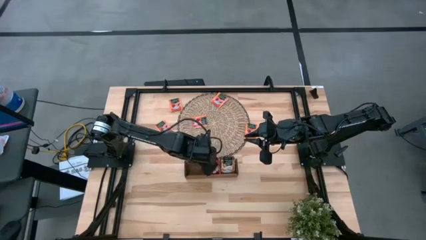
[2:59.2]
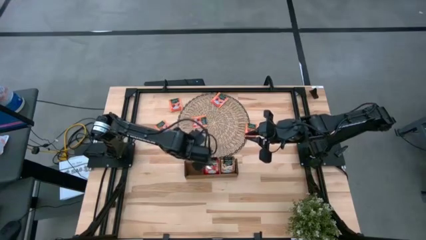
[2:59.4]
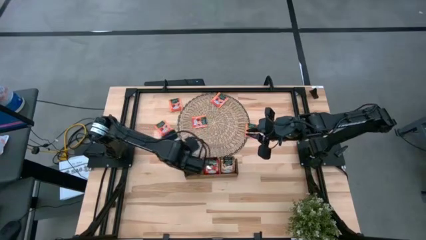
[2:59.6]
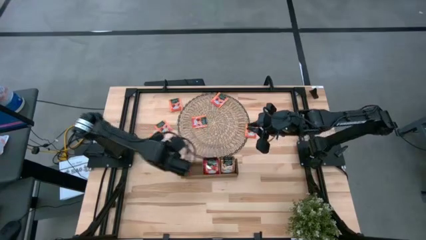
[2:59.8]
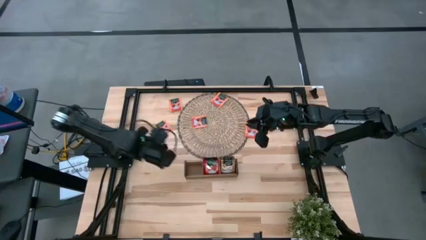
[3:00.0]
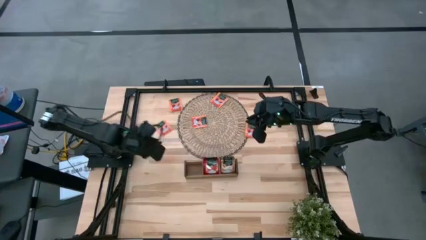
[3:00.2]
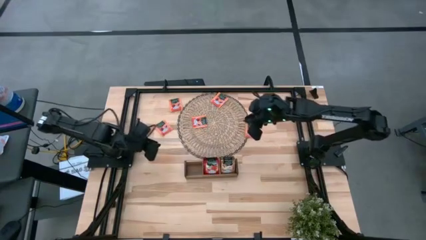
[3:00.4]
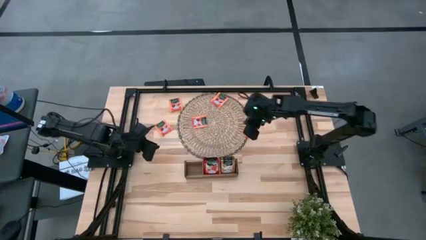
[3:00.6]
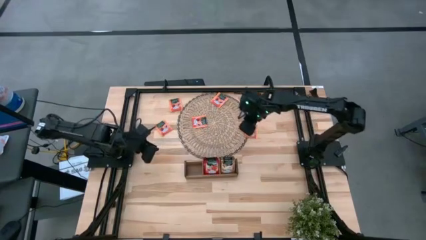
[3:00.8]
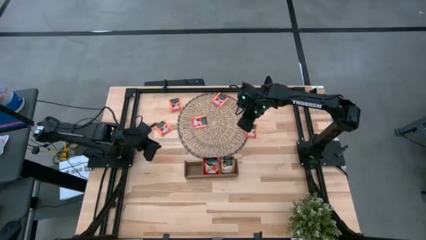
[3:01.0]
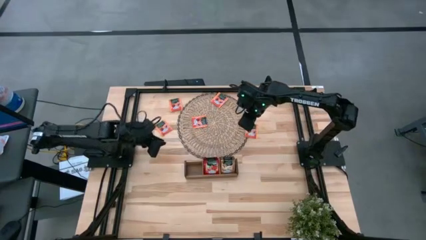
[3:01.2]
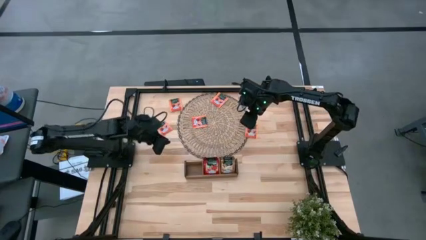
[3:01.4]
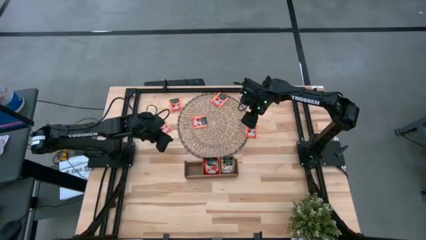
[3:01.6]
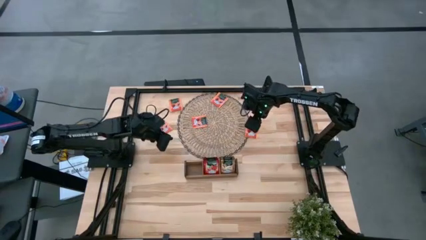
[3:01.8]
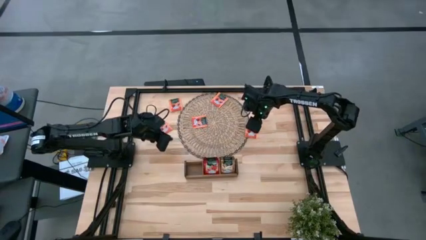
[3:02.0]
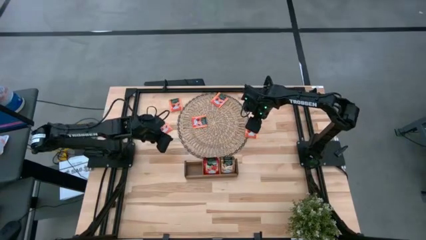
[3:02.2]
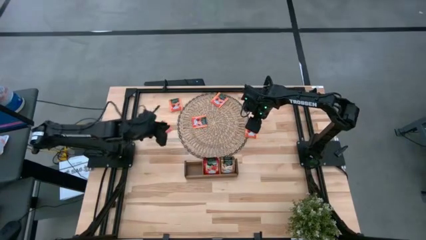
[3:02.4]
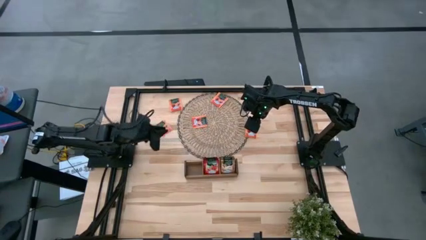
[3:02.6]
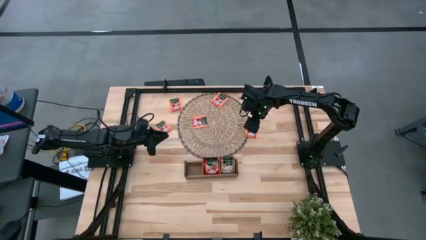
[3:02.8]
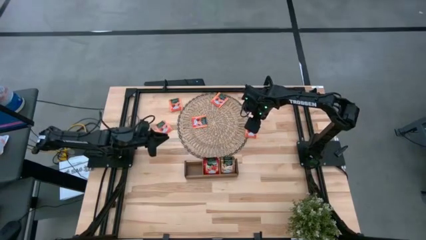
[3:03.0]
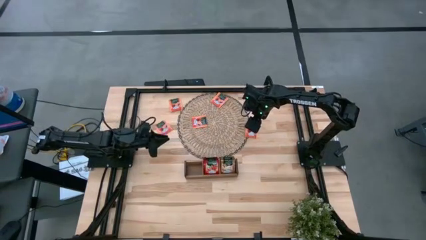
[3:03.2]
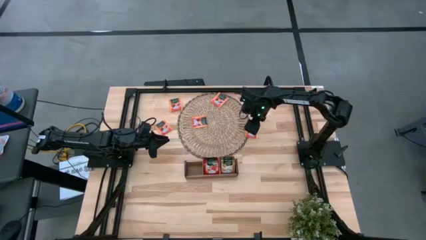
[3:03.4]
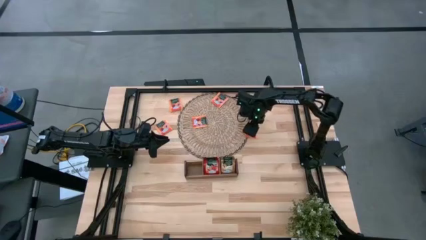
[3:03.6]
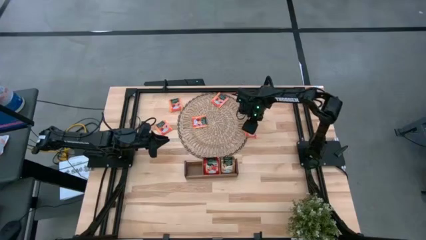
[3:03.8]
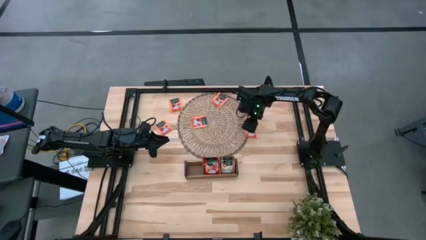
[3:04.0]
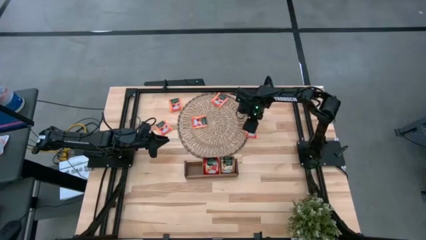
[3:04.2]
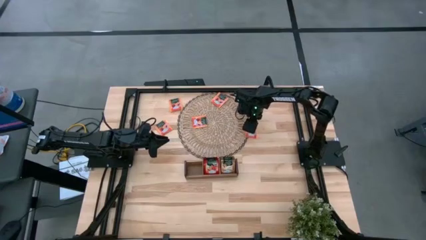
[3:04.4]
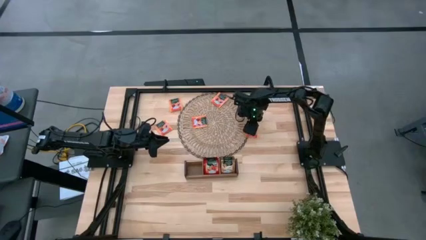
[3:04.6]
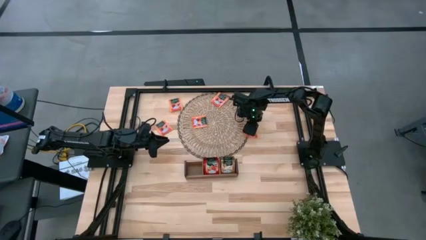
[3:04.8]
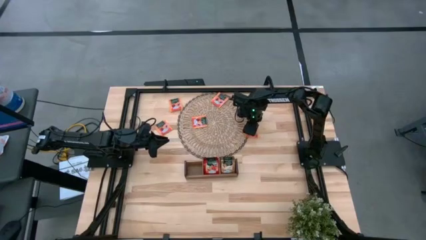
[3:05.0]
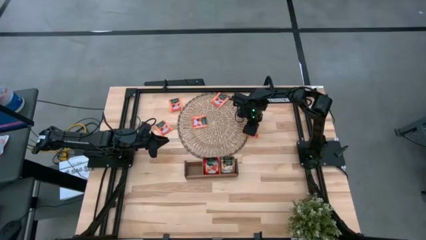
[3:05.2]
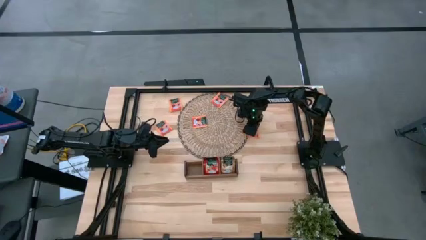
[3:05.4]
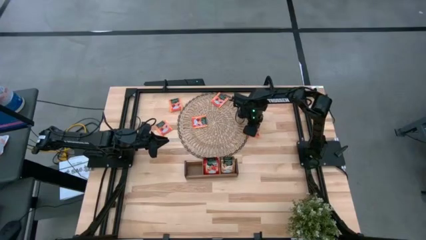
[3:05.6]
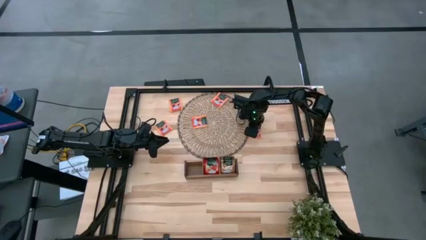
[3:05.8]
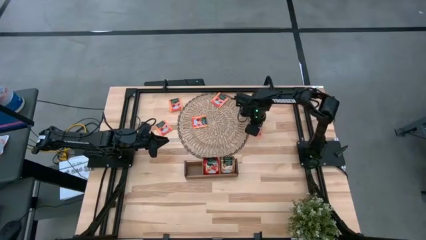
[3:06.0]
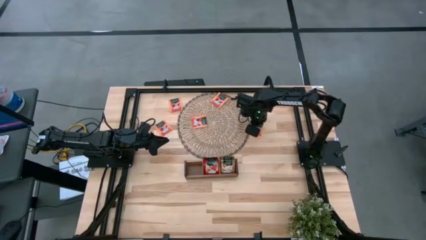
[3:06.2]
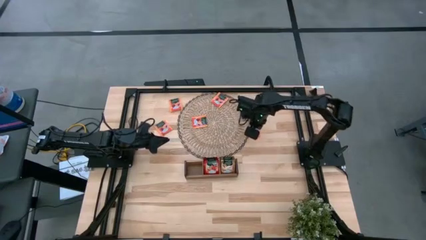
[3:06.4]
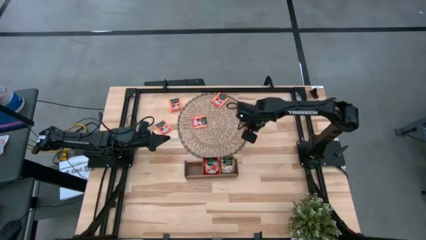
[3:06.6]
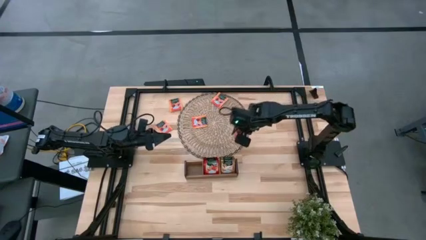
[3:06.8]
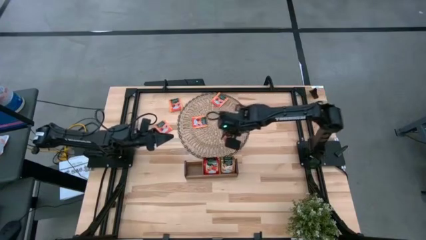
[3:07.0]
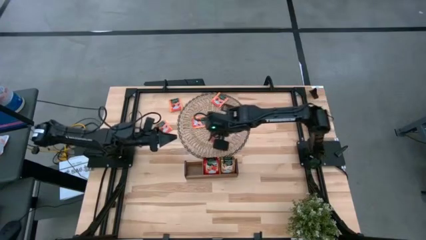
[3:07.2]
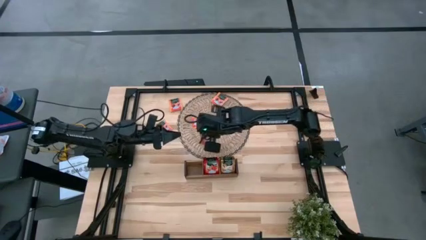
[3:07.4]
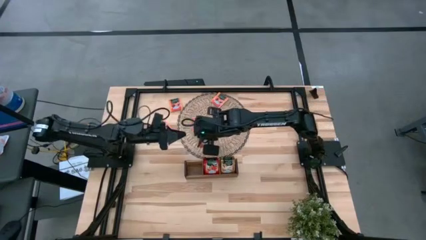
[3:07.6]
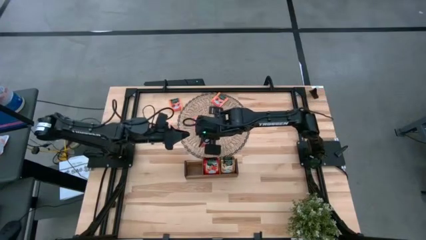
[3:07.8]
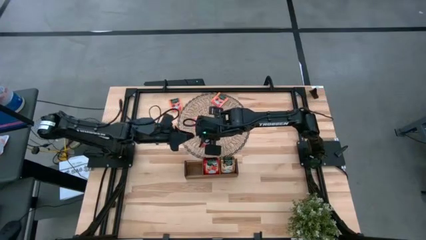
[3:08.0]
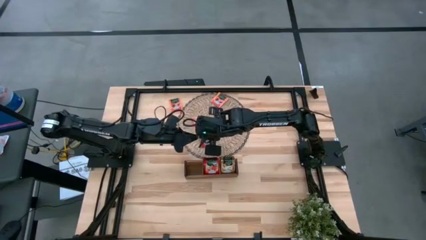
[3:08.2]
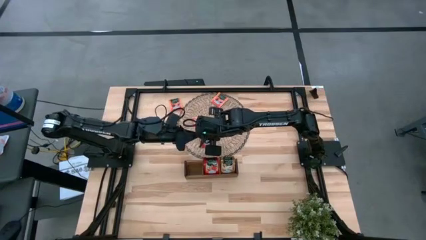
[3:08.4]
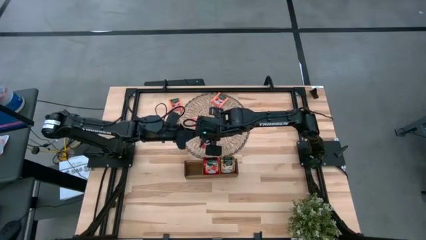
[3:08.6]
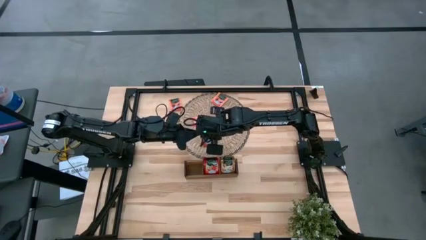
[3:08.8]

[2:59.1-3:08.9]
Task: Pick & Place Tea
Put the orange tea bag into the left section of the wooden organizer

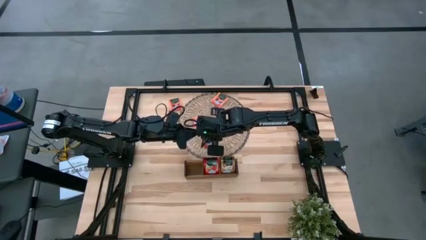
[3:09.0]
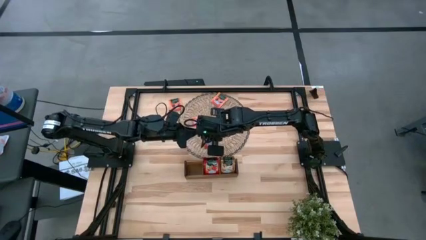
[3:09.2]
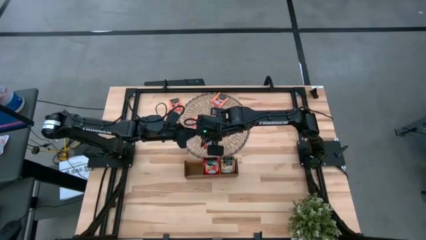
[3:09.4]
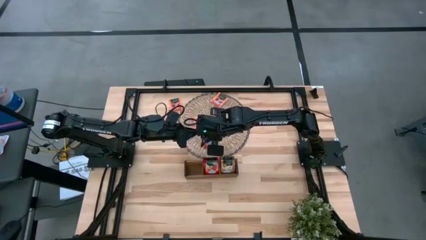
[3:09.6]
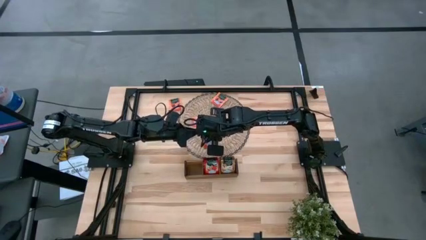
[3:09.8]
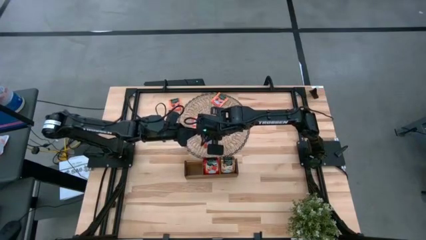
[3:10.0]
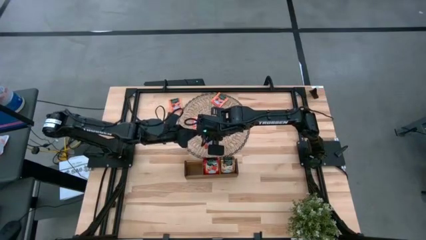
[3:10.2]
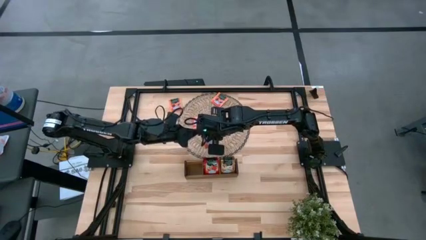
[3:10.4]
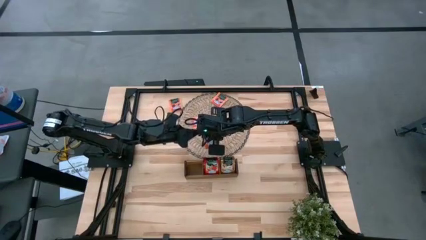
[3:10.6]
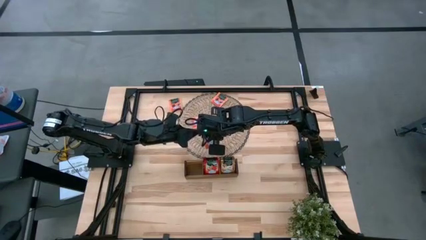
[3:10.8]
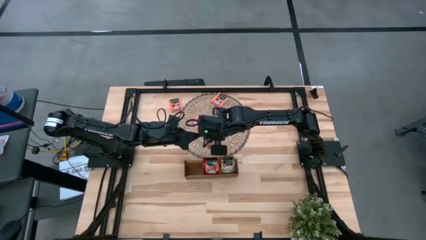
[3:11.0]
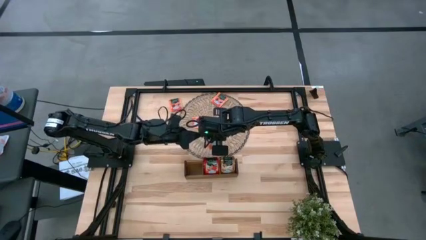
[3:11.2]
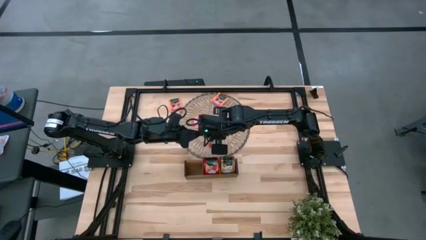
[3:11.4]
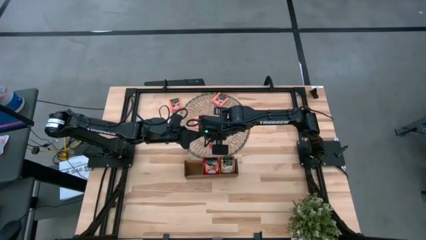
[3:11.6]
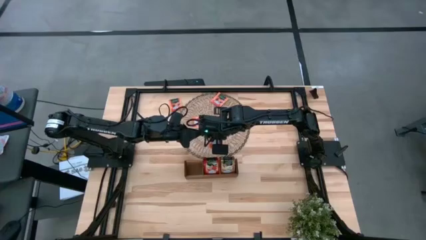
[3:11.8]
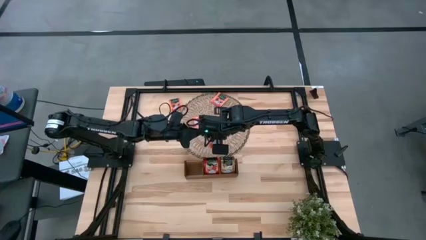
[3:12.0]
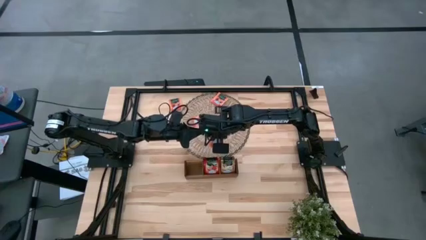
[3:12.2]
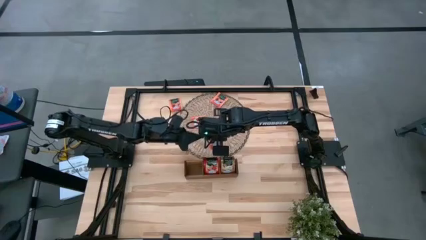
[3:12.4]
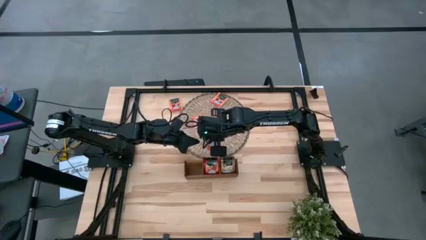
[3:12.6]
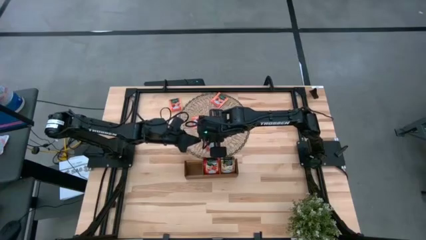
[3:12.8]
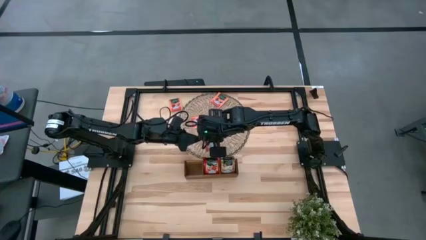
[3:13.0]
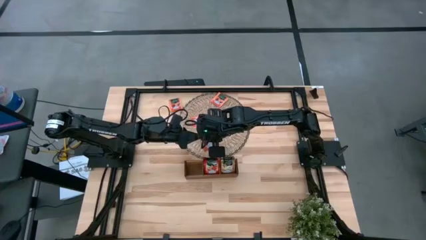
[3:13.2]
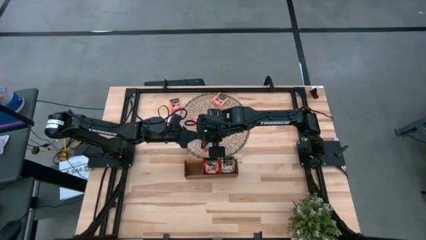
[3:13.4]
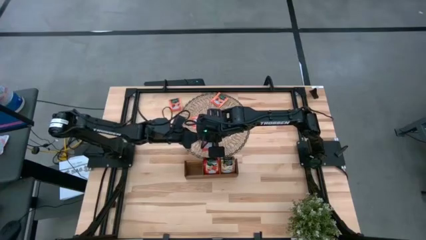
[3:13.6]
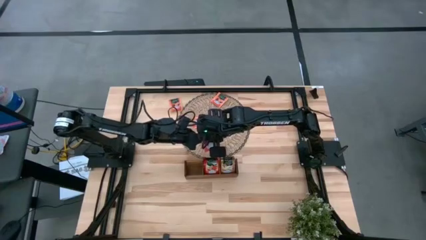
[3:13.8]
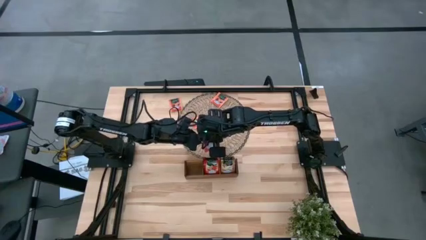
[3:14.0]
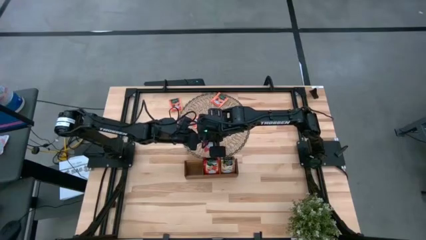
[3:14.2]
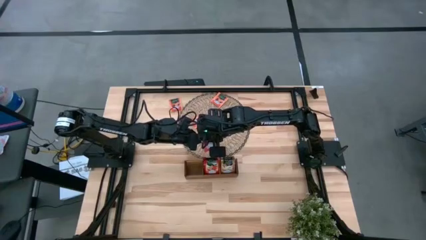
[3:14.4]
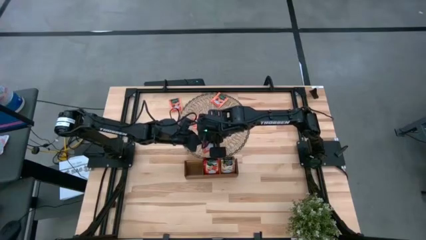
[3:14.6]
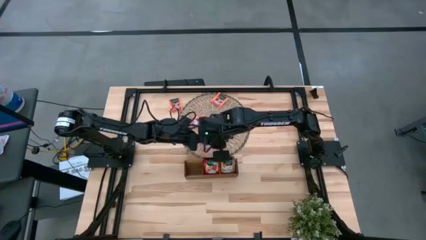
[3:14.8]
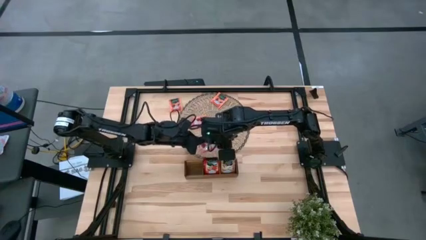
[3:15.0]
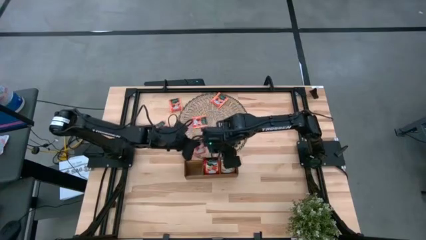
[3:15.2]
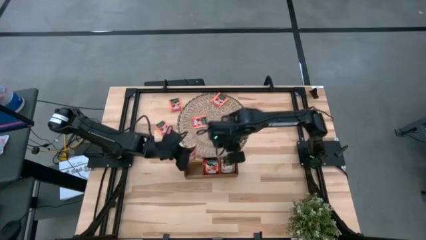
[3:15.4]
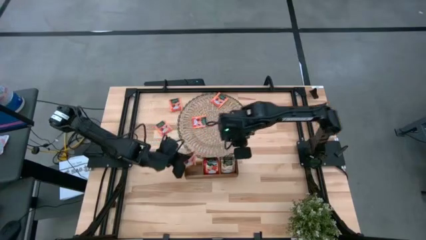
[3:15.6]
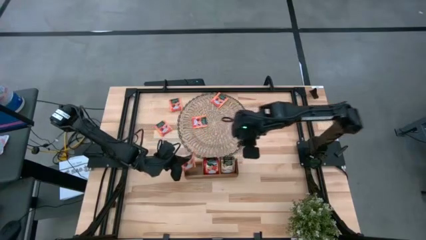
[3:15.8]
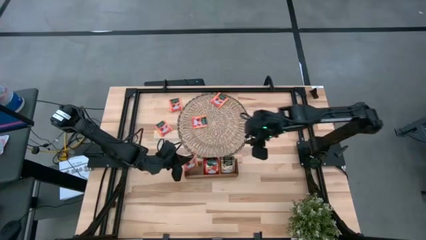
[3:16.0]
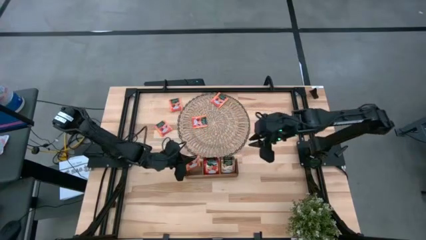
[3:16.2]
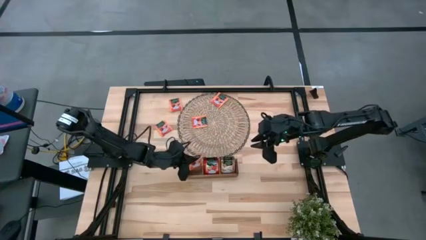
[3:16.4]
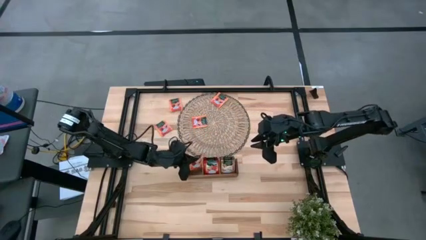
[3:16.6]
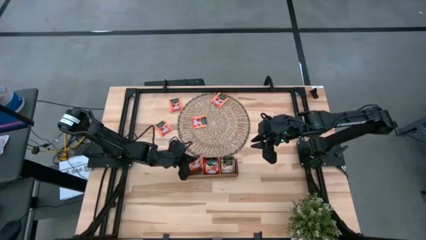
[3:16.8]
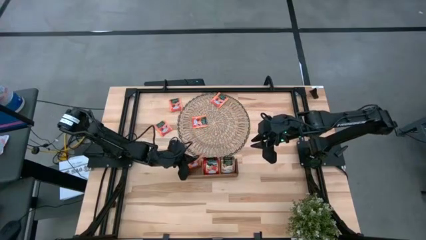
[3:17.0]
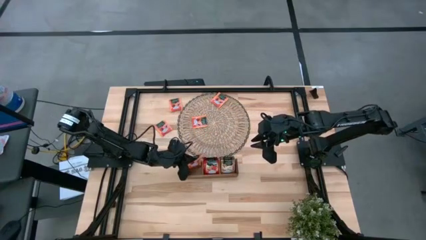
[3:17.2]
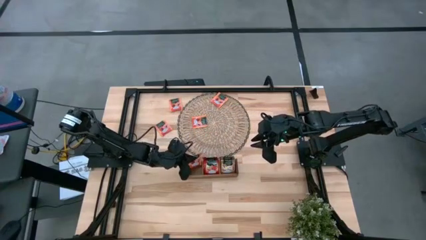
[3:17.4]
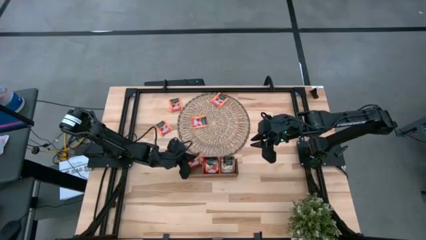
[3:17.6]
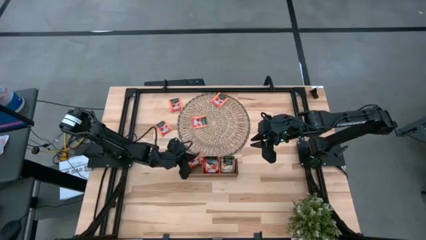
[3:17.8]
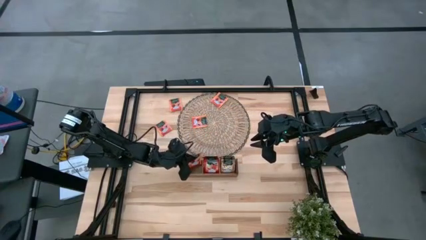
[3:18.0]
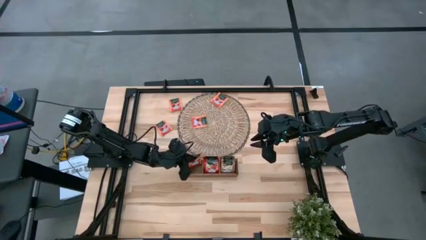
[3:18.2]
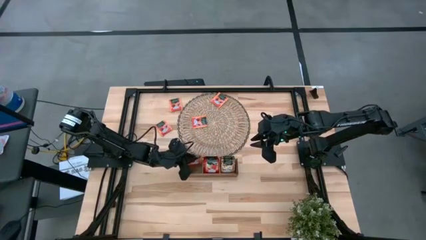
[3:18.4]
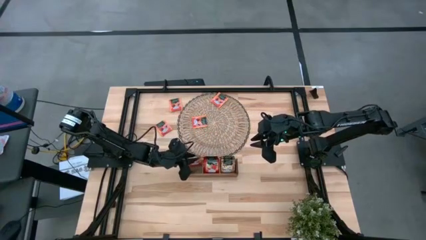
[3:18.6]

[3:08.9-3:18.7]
Put the orange tea bag into the left section of the wooden organizer
